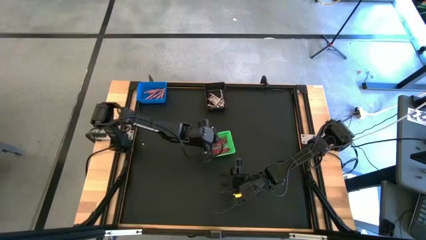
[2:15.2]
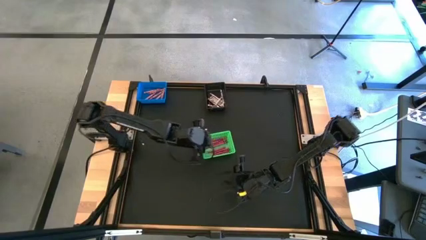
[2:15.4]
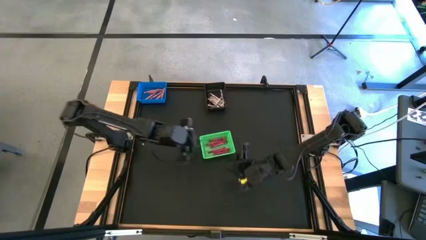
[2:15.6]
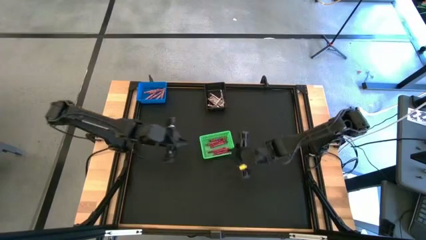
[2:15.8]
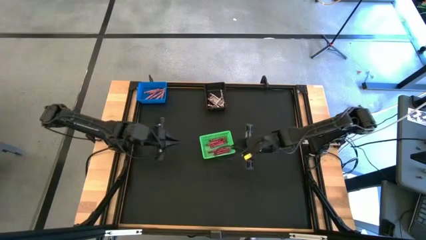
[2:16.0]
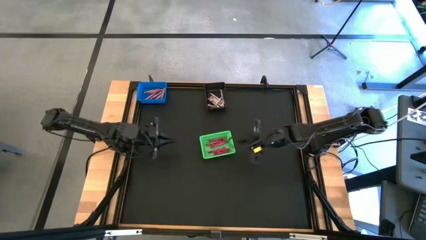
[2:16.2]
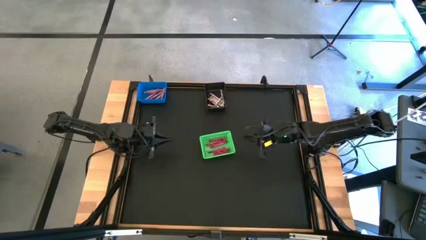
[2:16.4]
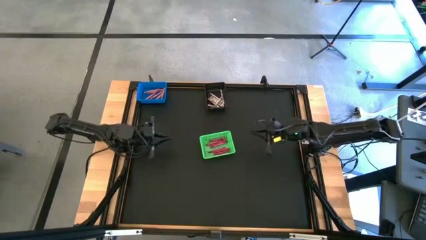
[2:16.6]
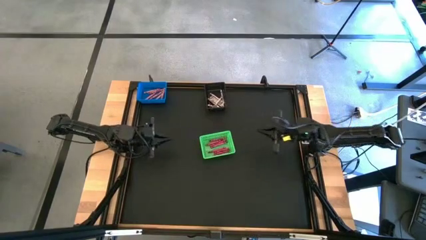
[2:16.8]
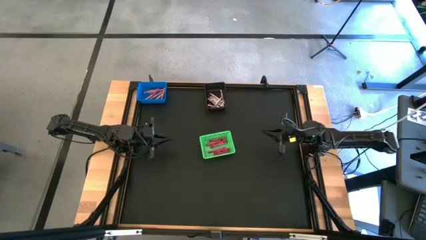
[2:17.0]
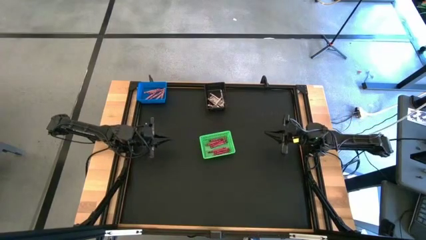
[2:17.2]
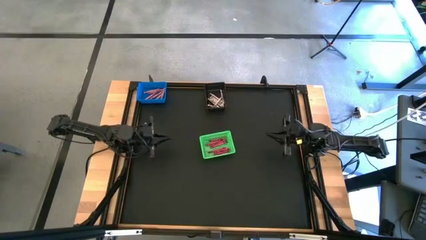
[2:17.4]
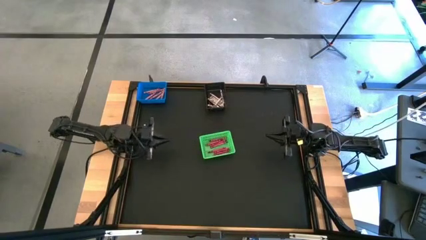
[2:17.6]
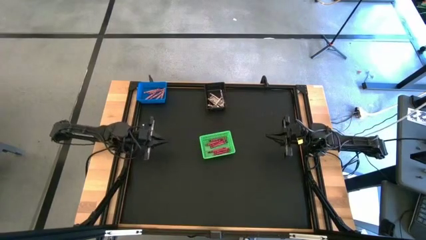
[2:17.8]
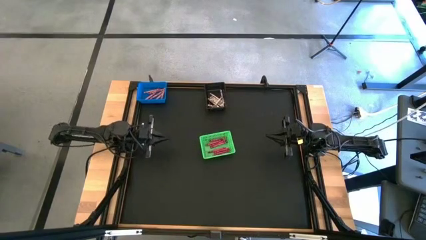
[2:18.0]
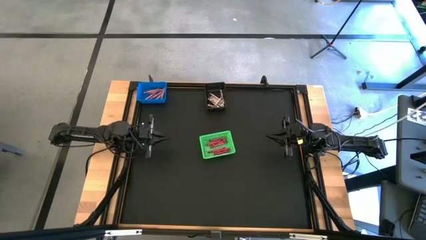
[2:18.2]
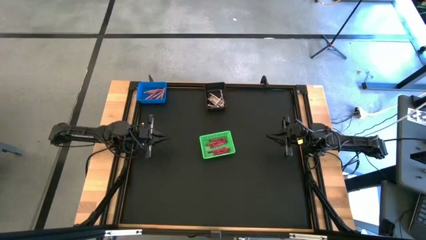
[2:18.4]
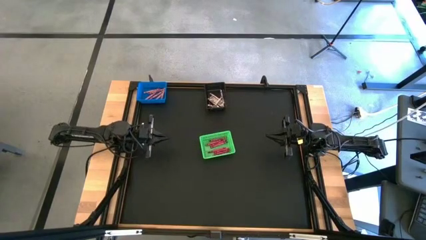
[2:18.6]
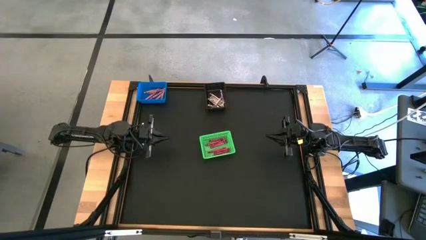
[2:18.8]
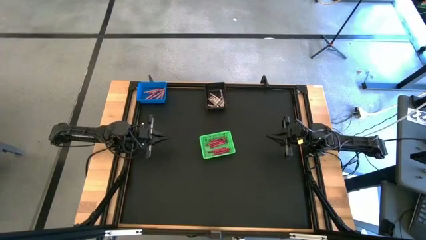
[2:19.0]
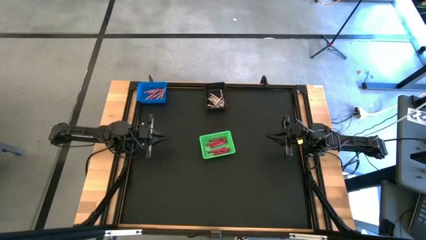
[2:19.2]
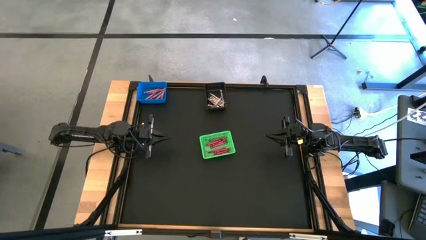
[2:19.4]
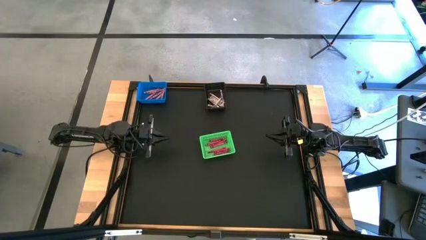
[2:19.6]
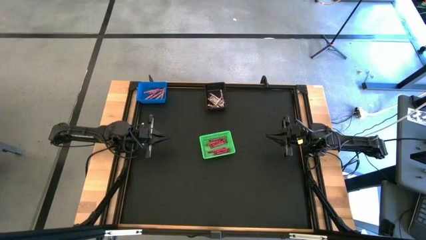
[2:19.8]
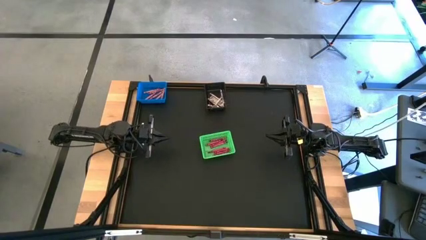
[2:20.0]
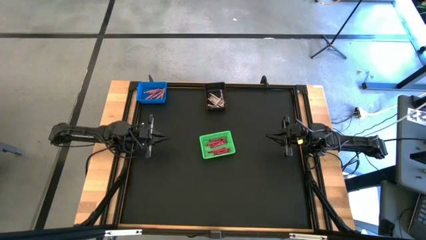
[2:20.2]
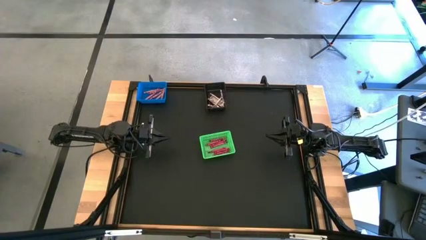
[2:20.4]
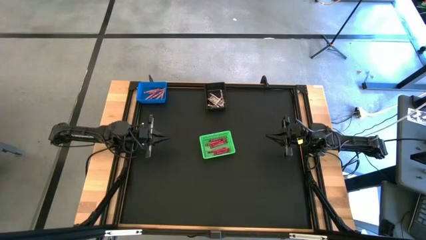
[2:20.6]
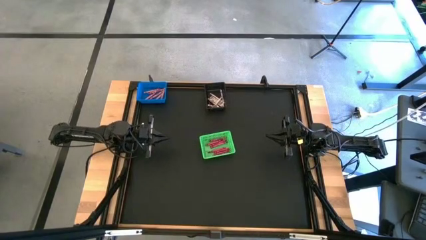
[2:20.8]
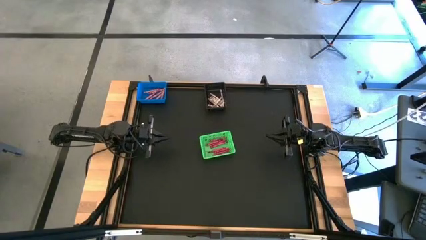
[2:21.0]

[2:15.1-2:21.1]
Task: Sort crayons
Return to Home Position

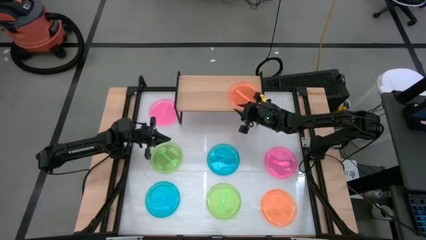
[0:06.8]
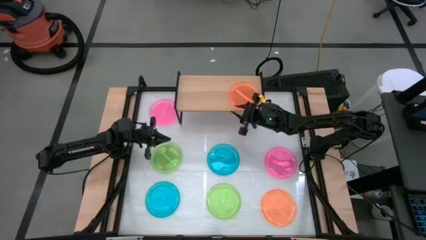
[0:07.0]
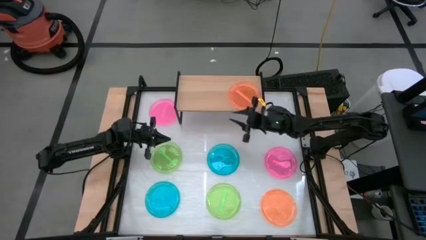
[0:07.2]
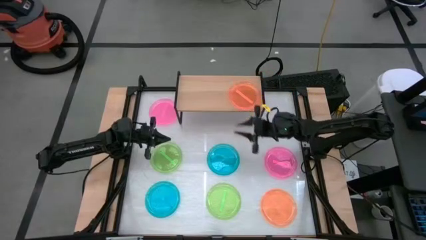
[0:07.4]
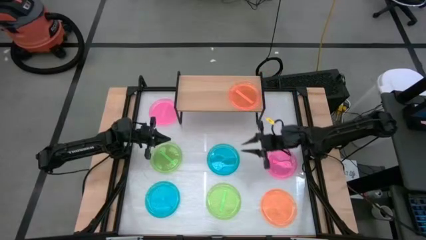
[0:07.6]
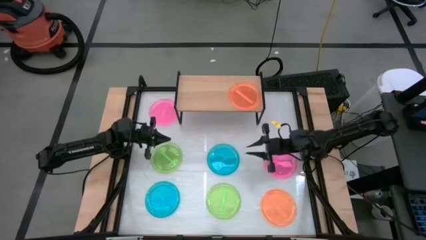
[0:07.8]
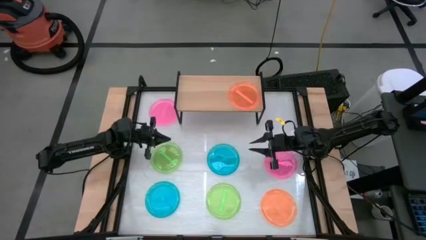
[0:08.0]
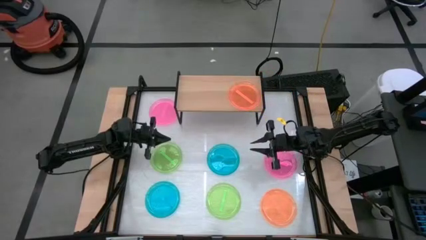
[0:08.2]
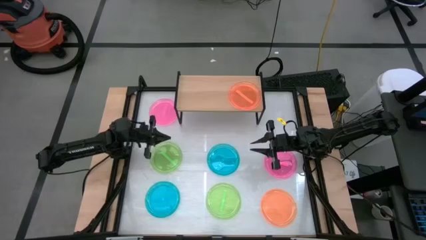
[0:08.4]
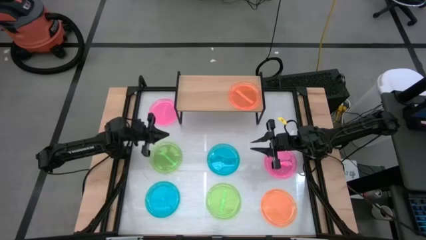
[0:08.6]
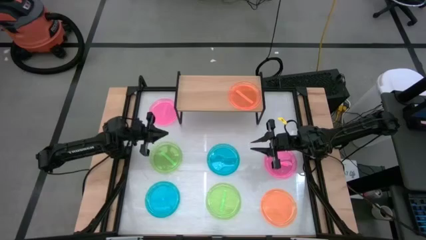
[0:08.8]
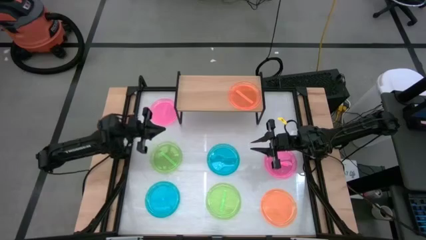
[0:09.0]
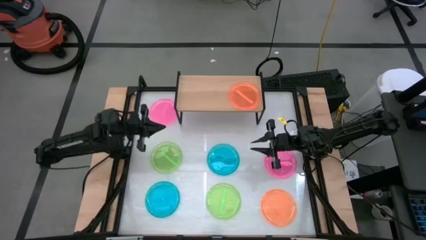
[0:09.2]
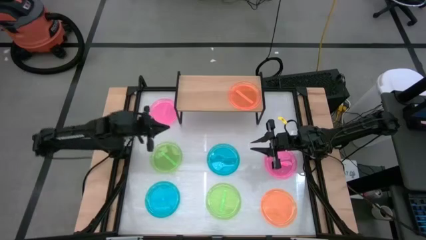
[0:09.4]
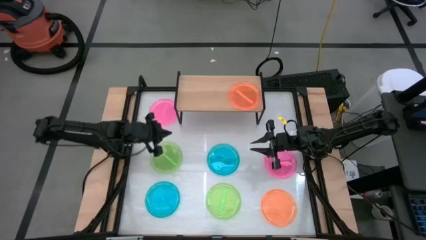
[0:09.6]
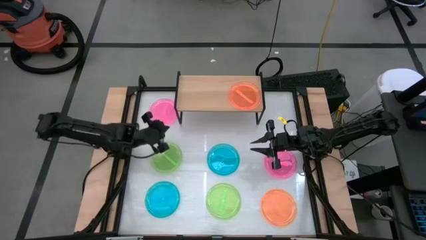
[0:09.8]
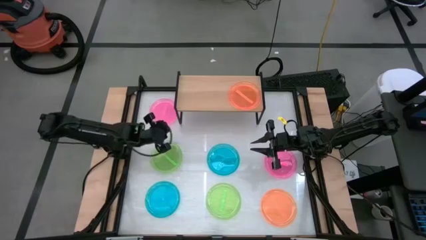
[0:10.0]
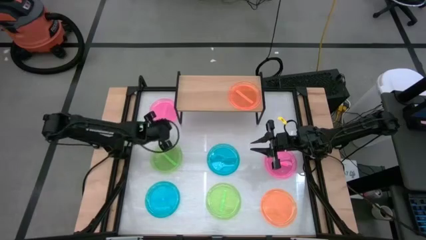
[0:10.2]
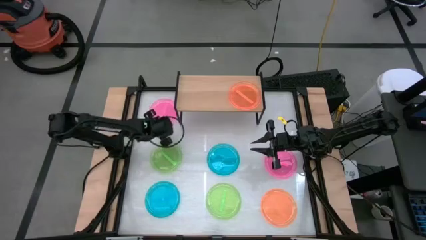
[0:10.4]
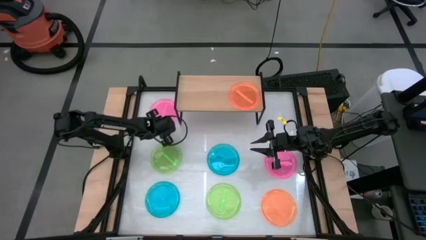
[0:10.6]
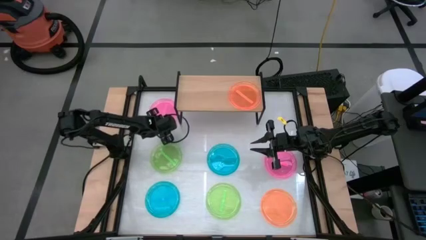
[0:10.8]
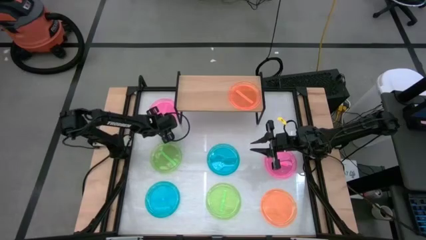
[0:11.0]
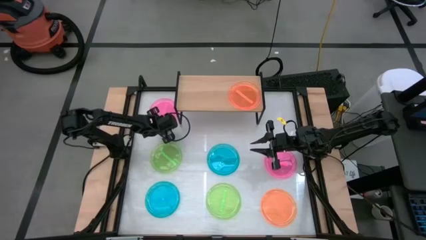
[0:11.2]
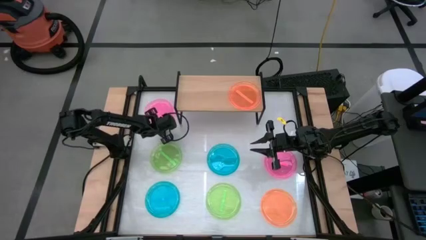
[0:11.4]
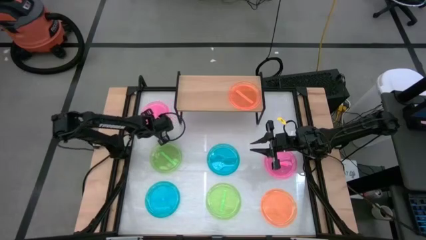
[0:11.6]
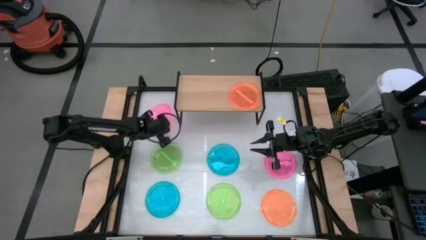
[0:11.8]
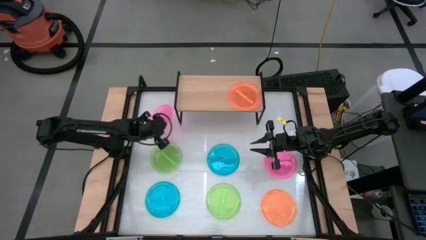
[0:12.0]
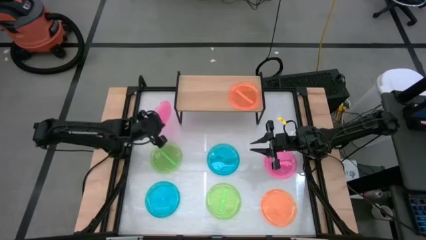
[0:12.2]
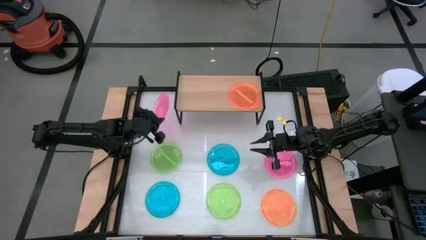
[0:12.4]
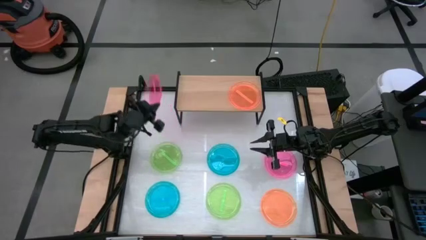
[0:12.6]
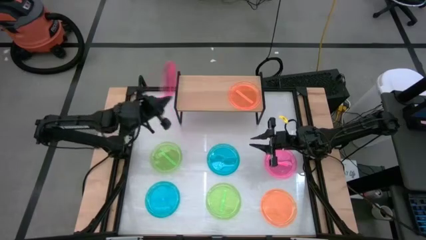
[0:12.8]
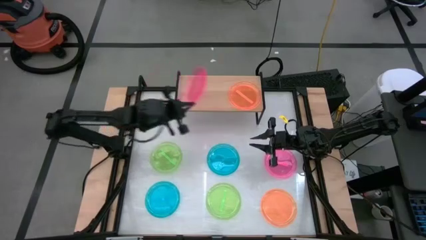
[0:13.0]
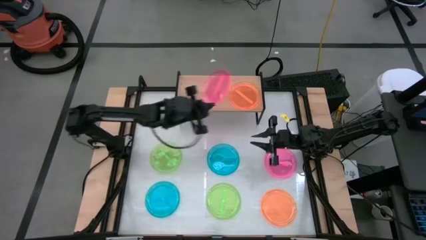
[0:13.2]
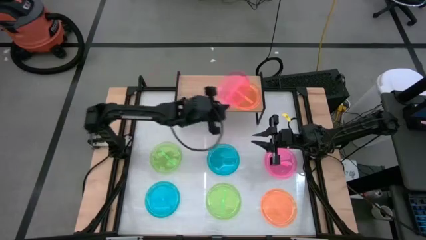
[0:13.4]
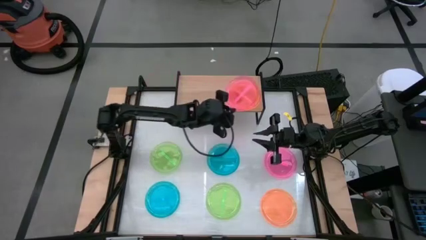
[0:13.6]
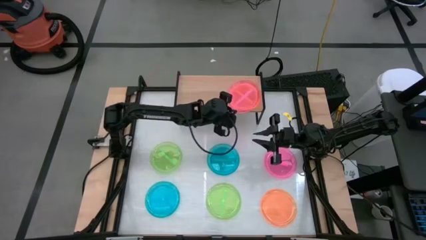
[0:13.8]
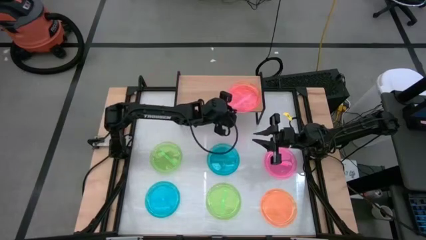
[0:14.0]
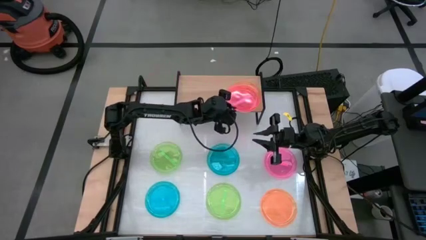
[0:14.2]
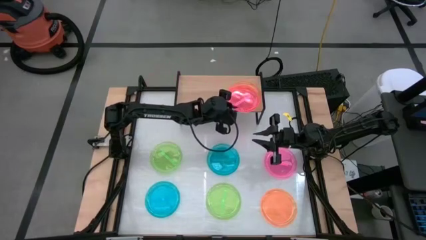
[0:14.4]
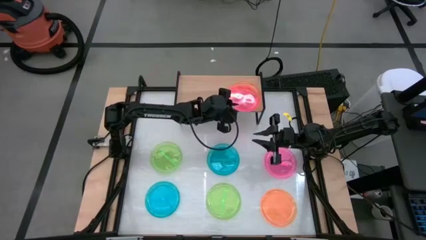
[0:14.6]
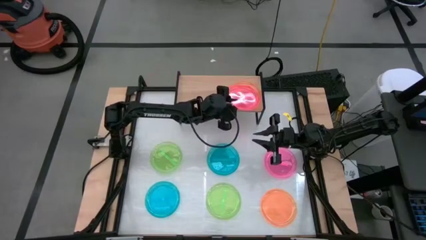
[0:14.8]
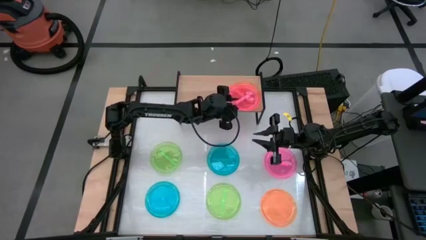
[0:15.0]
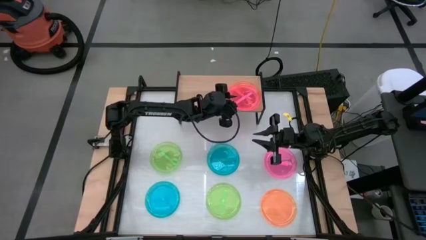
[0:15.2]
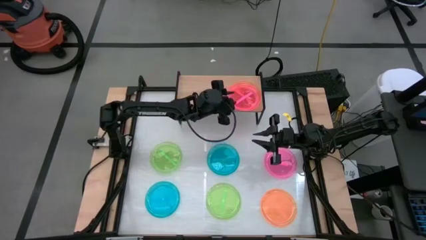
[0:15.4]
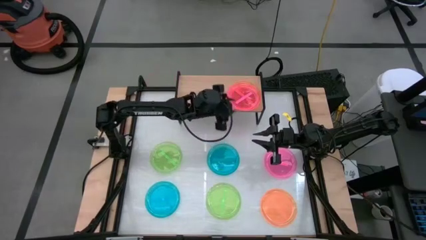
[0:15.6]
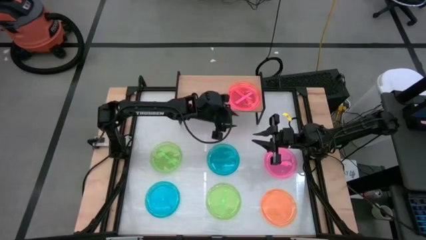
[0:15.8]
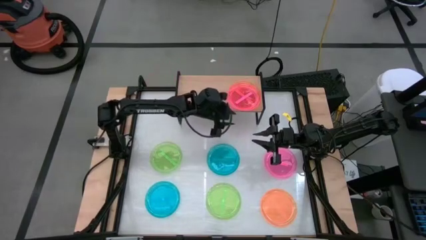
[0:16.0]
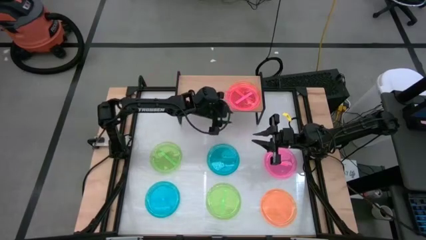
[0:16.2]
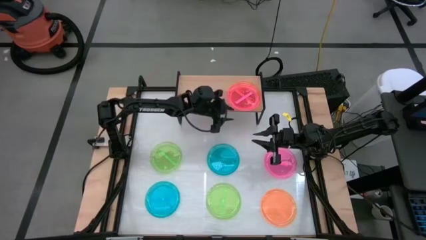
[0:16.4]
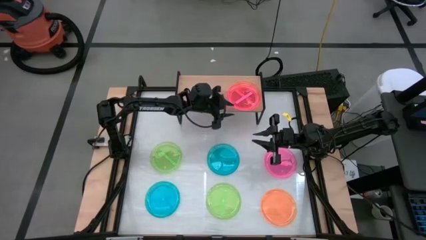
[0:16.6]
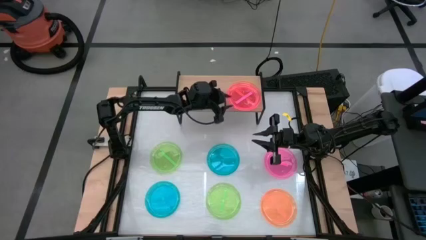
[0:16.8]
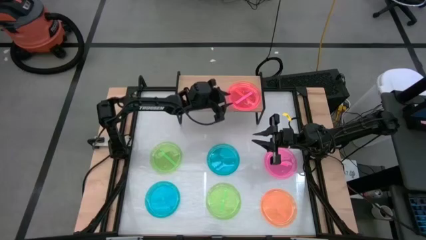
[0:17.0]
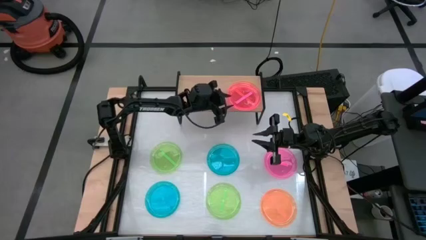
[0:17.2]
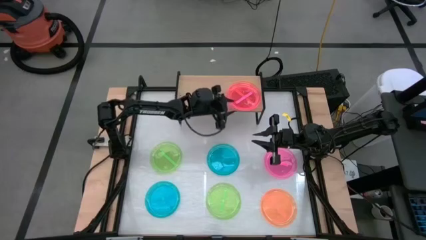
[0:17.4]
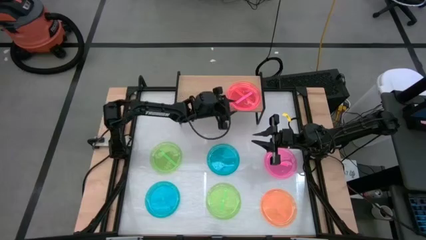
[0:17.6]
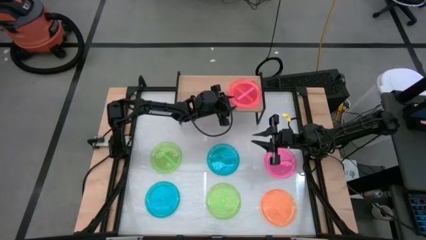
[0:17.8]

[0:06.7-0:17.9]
Task: Place and stack plates onto a shelf
Stack the top pink plate on top of the orange plate on the shelf
